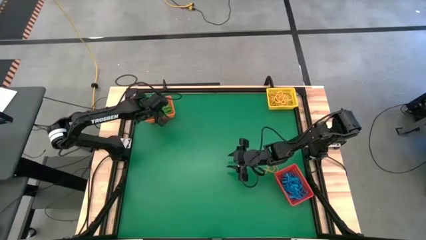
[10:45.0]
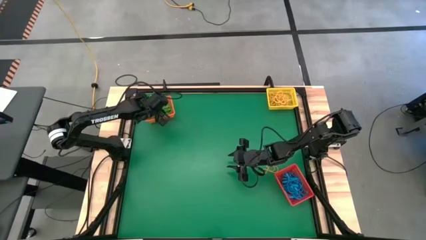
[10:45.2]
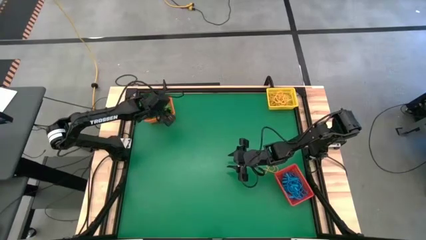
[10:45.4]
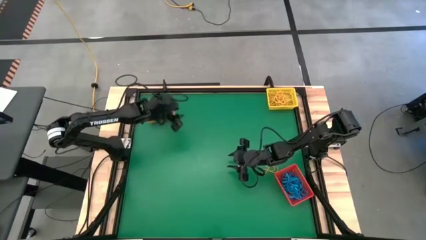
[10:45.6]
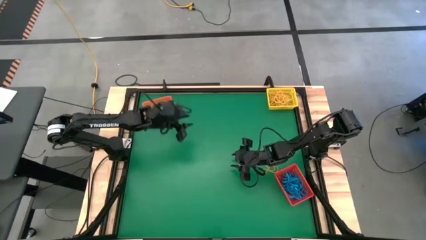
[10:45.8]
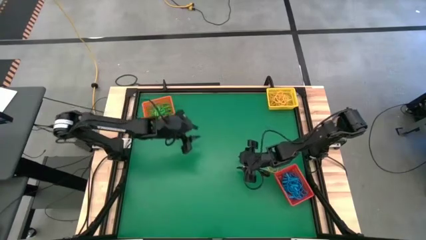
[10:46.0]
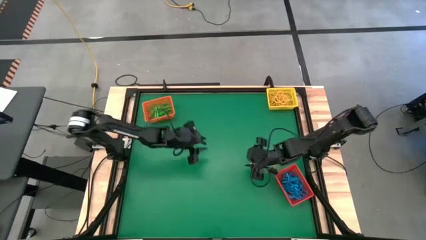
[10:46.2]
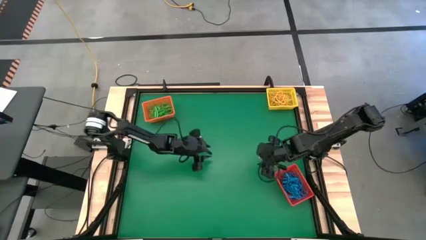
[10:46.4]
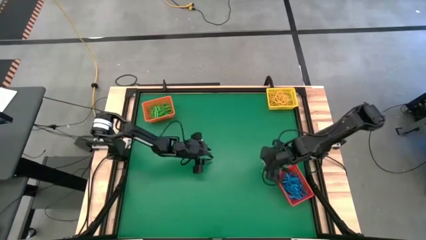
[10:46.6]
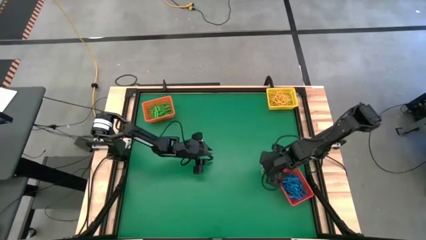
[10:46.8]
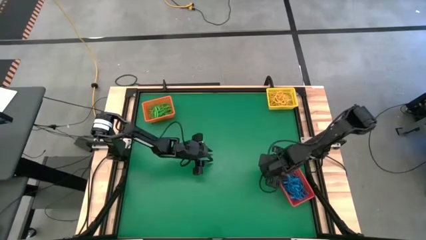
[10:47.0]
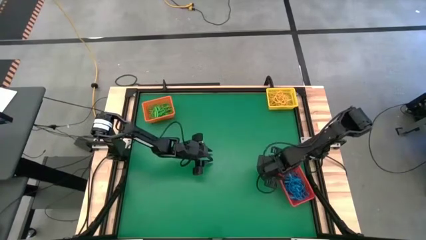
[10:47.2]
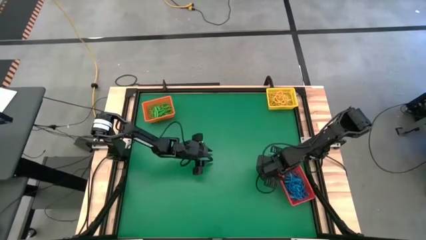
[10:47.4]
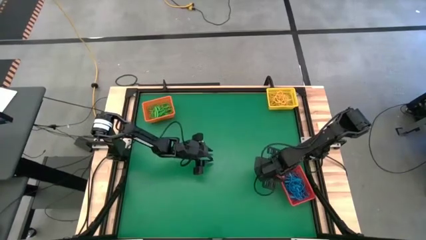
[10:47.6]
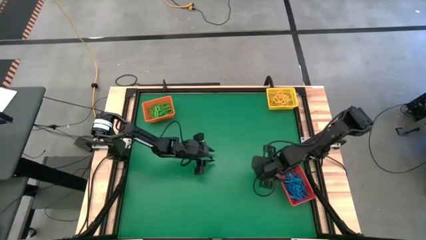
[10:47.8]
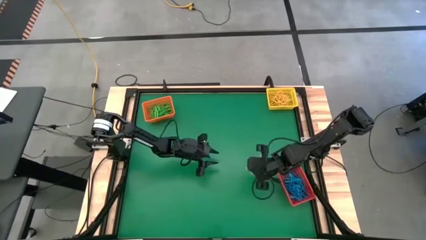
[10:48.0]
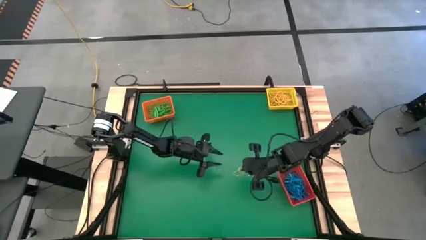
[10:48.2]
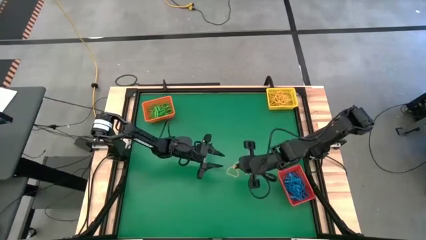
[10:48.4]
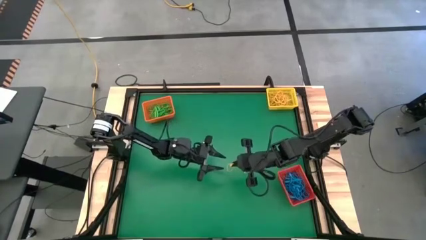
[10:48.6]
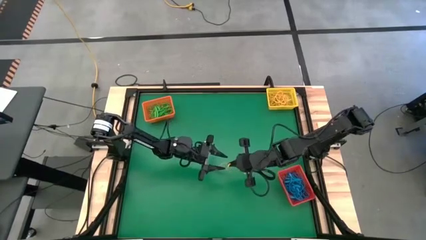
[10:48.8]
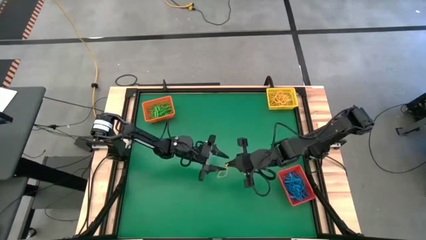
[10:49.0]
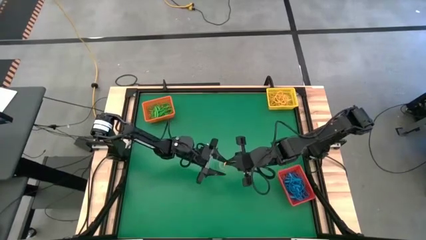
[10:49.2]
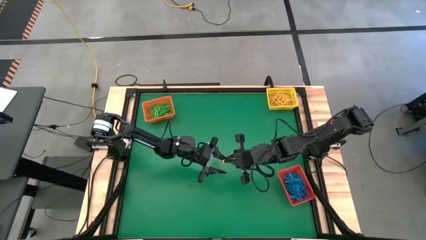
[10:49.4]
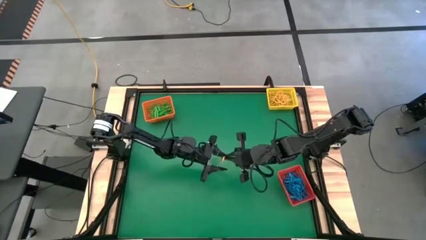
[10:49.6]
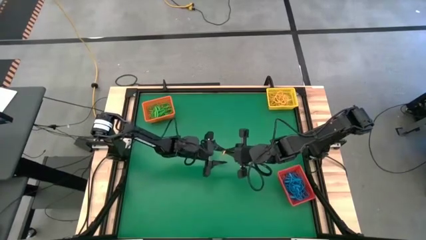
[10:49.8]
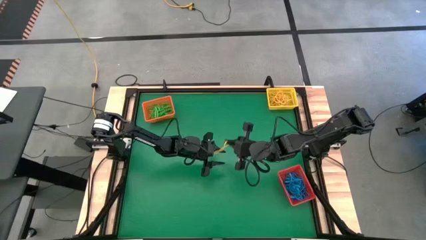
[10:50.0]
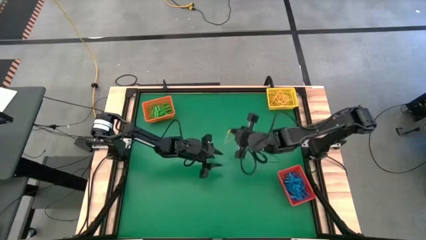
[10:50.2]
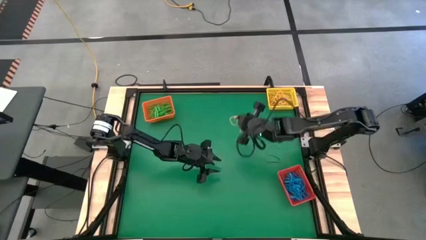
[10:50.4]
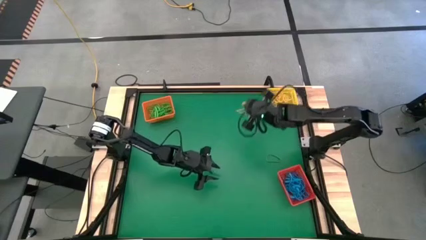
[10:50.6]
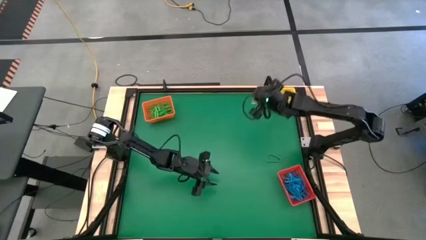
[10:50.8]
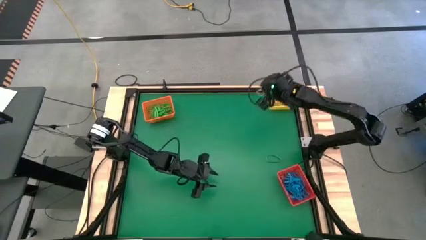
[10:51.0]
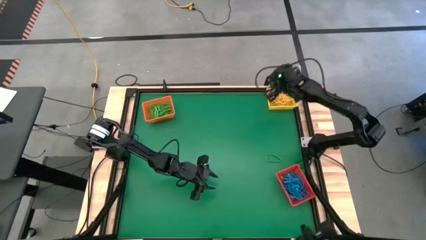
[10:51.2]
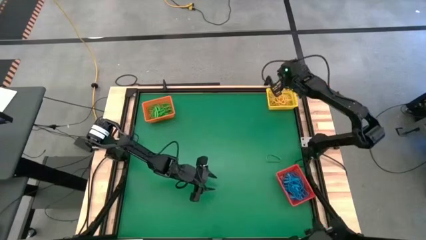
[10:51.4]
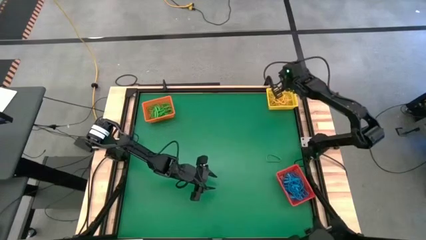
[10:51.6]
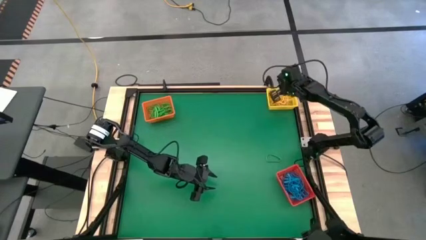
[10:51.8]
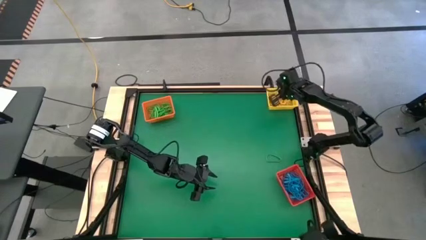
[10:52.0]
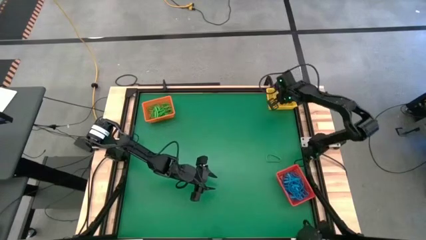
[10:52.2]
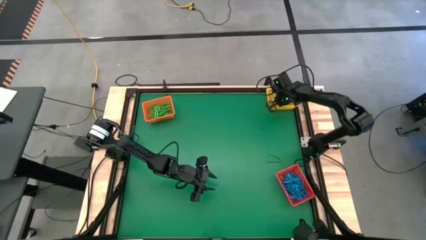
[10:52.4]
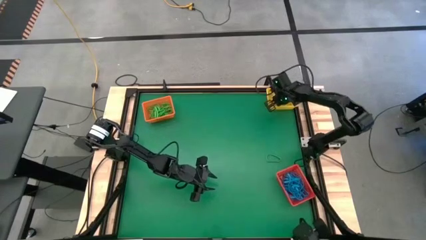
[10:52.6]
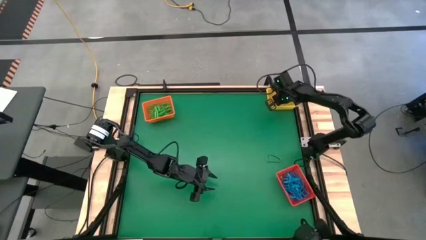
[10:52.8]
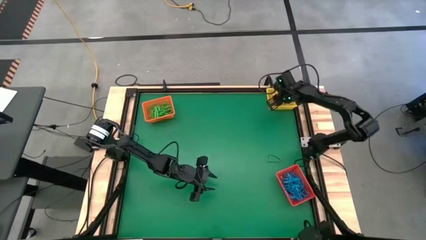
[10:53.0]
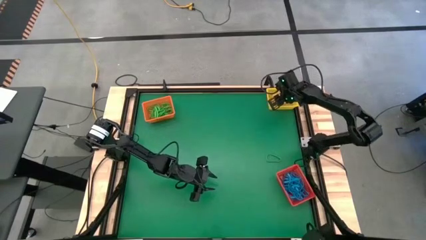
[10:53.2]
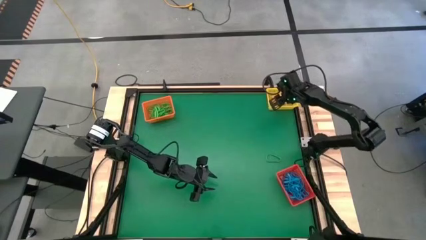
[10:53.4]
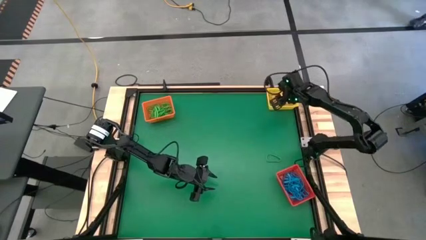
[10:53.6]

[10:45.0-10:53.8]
Task: Sort rubber bands into baskets
Put the yellow rubber band into the yellow bin

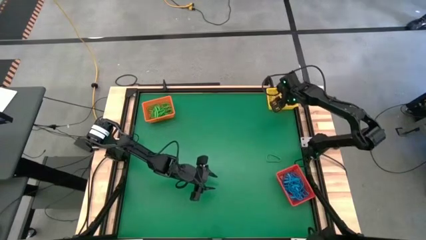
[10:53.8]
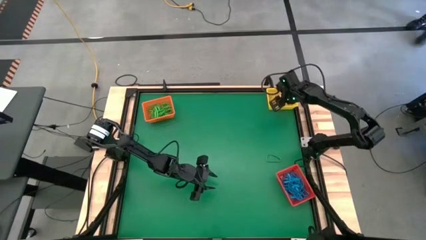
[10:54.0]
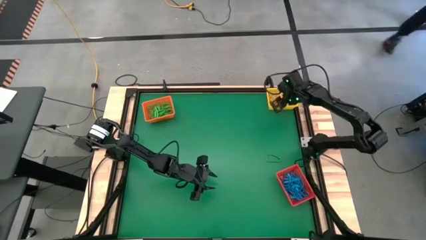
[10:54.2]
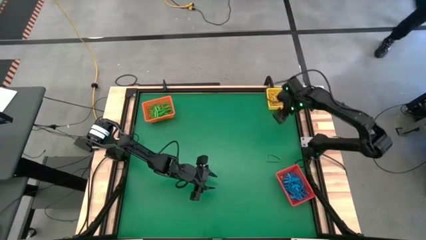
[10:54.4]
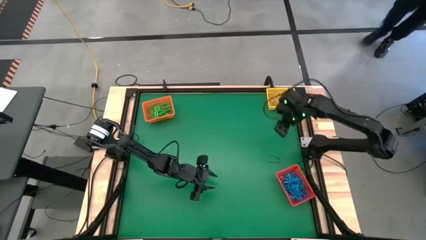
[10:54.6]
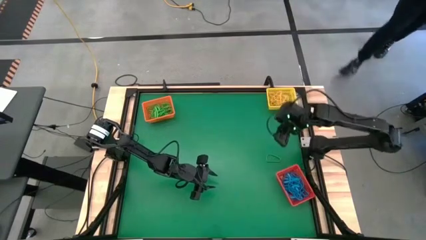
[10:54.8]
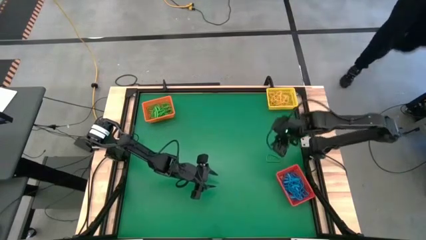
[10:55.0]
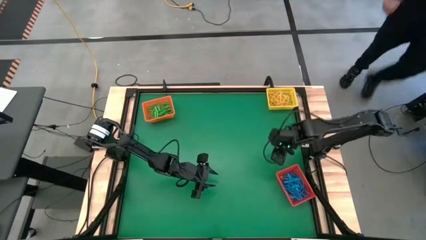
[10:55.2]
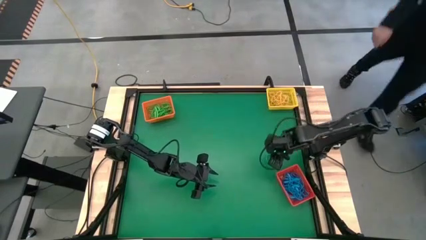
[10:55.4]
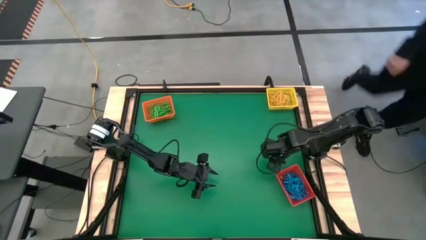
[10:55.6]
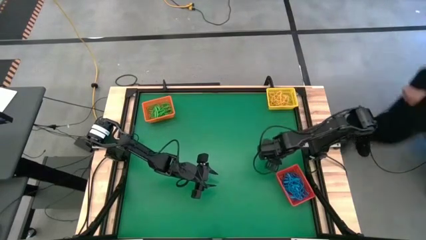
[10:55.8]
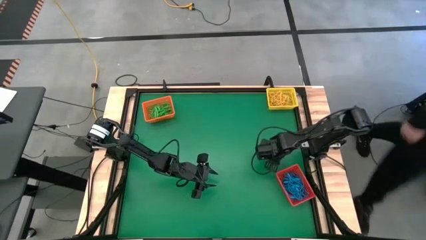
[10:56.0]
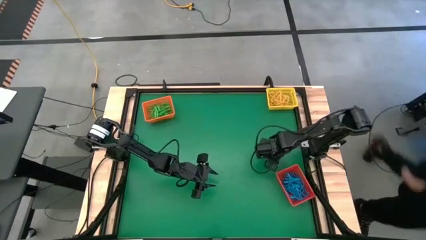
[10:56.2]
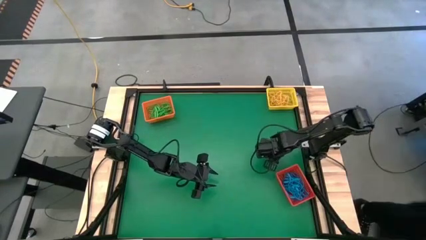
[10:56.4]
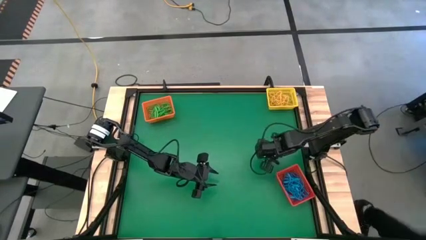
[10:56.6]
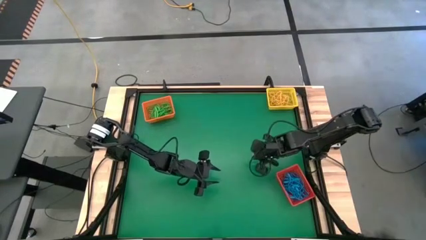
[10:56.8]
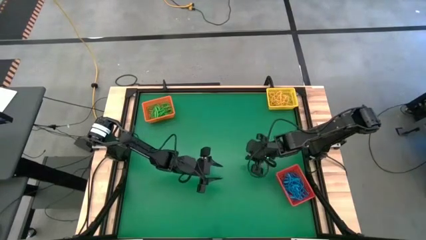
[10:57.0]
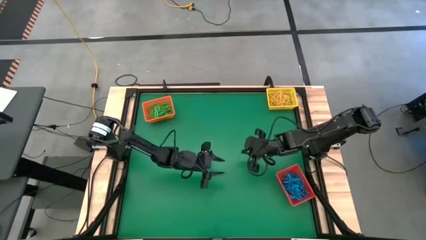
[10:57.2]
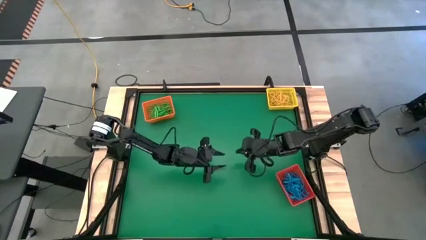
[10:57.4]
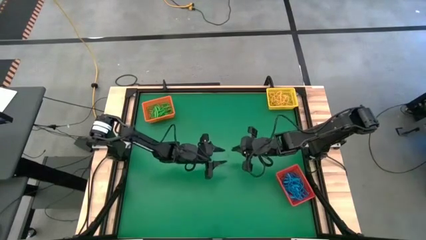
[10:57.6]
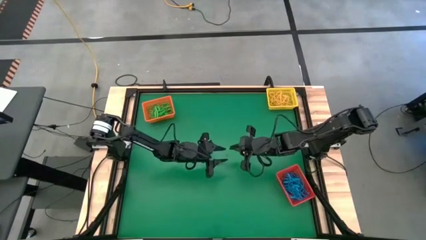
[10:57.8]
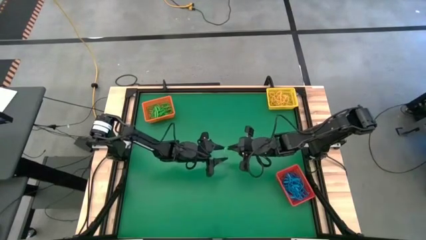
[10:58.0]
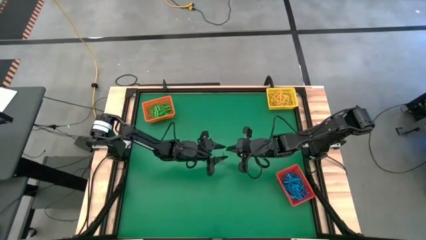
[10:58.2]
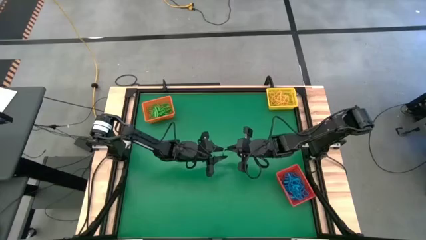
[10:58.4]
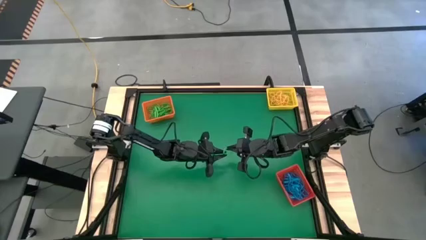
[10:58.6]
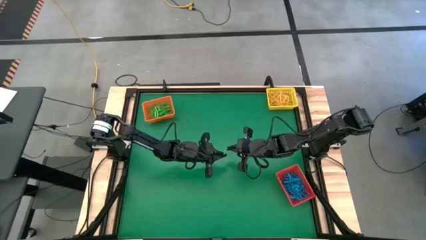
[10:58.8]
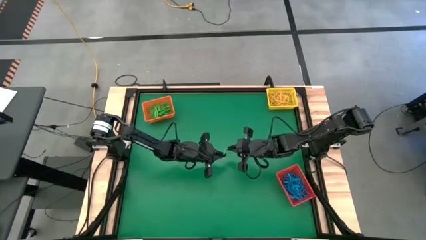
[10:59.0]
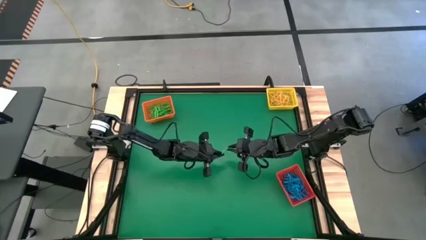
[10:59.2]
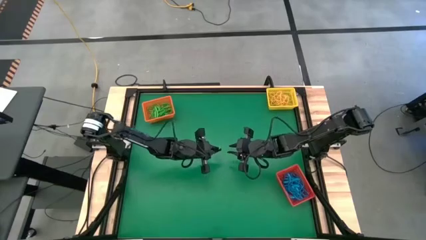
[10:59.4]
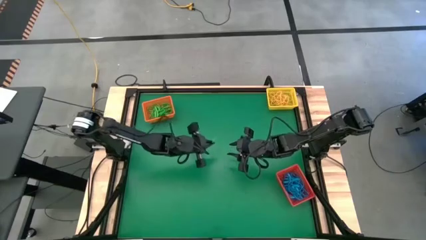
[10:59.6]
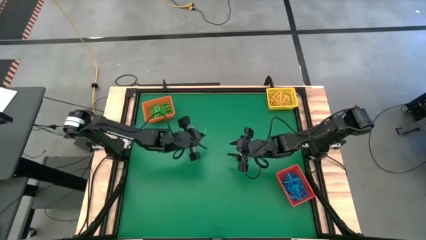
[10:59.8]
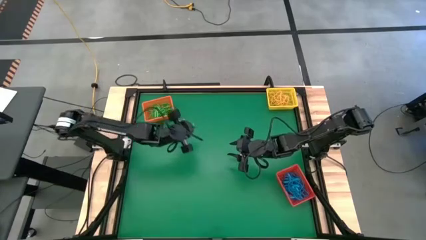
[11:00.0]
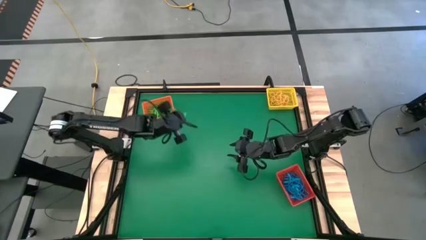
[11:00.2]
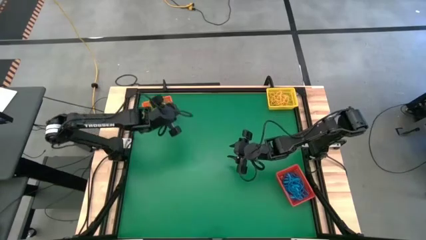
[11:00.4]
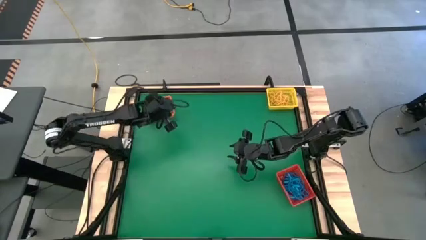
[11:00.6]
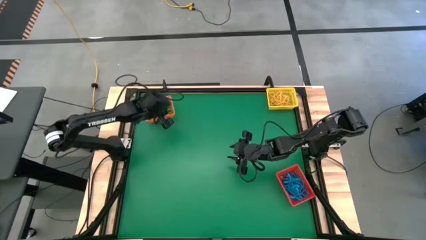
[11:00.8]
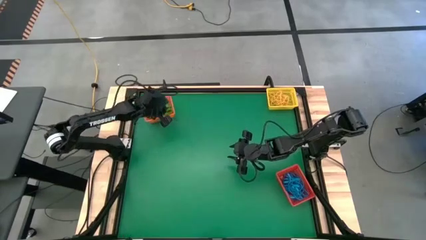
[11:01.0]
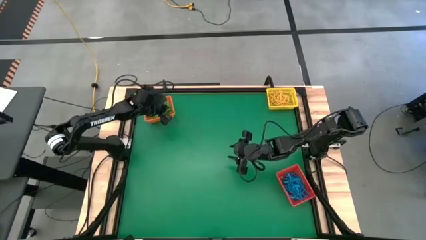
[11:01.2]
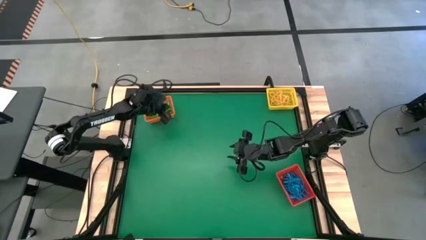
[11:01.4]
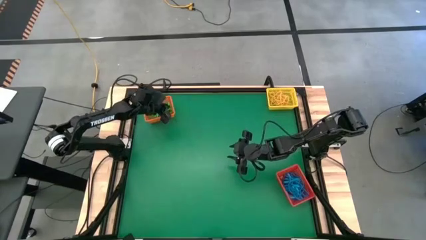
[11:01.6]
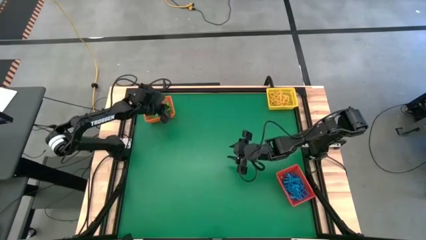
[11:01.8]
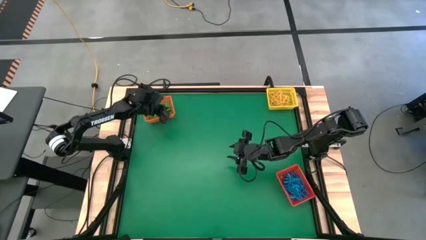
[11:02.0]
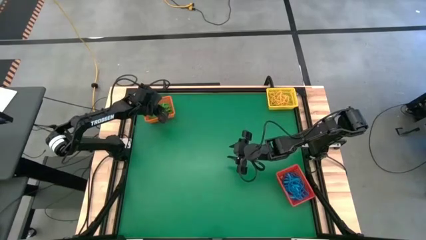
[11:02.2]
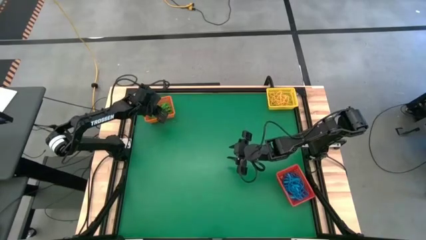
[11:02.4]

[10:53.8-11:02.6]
Put the green rubber band into the orange bin
